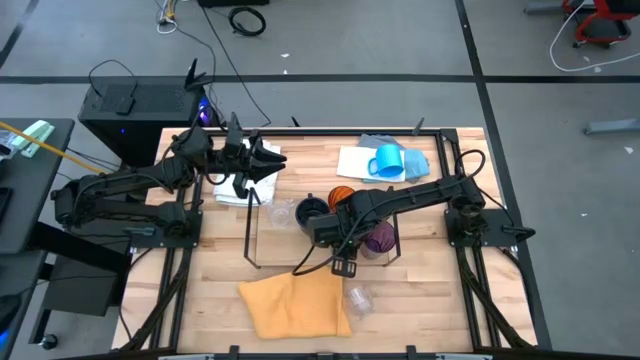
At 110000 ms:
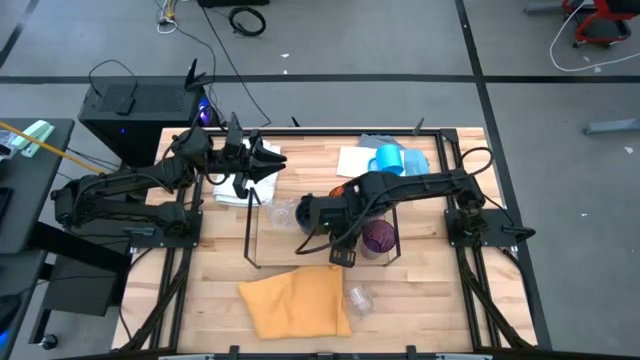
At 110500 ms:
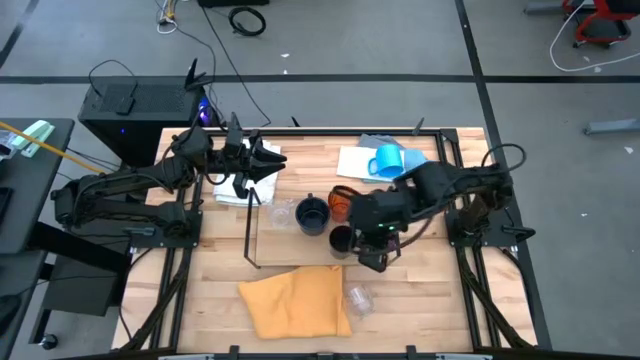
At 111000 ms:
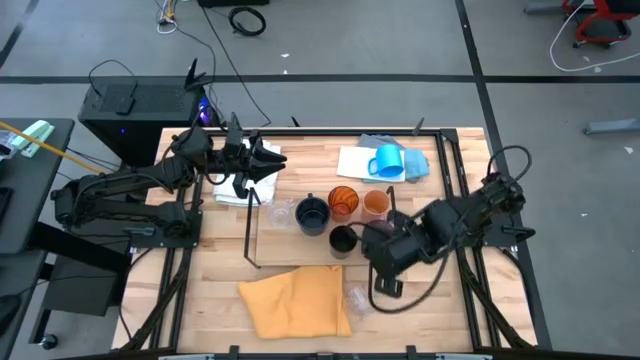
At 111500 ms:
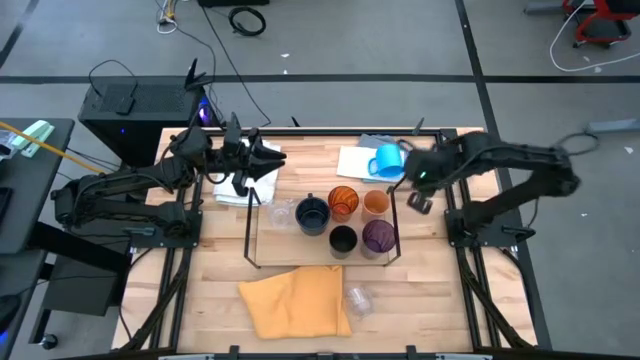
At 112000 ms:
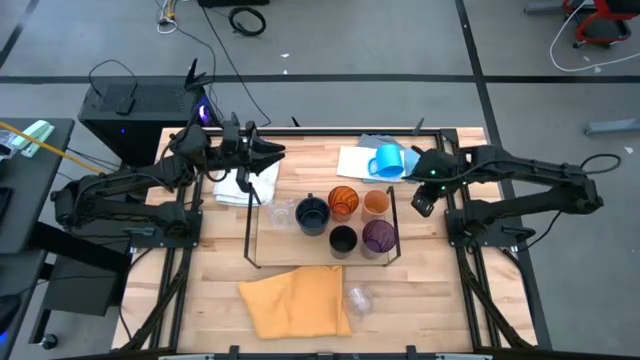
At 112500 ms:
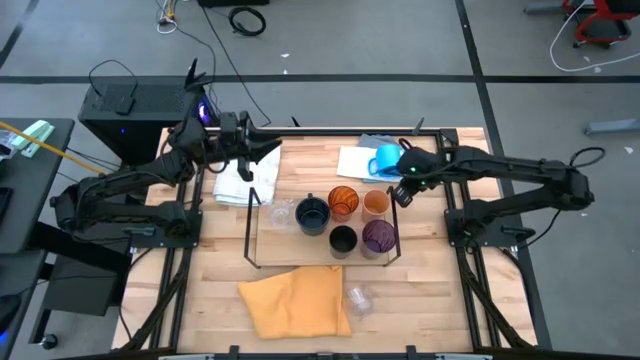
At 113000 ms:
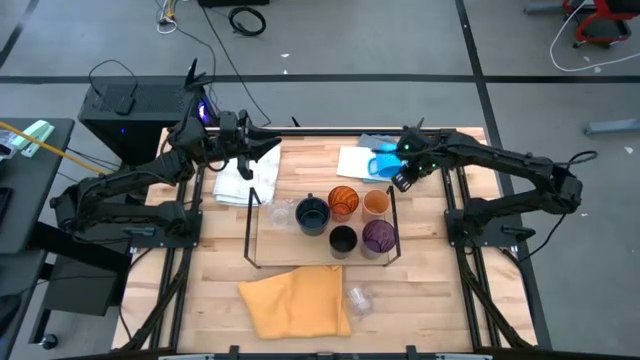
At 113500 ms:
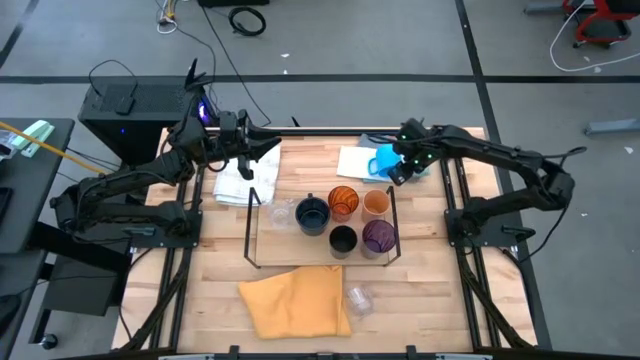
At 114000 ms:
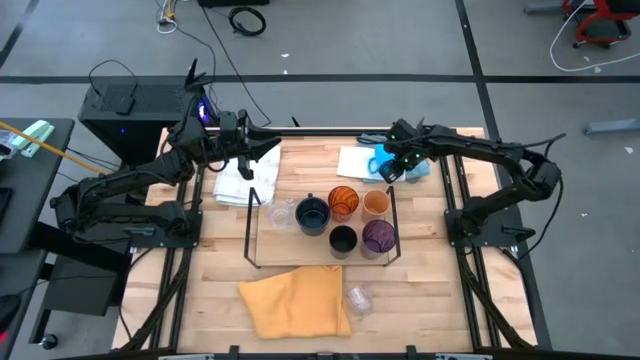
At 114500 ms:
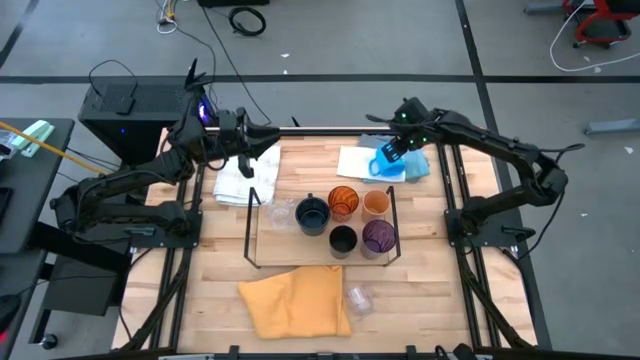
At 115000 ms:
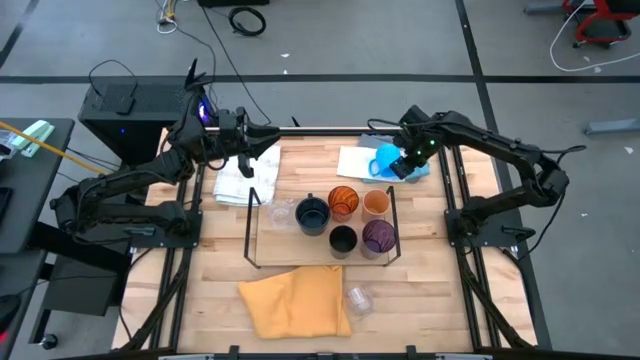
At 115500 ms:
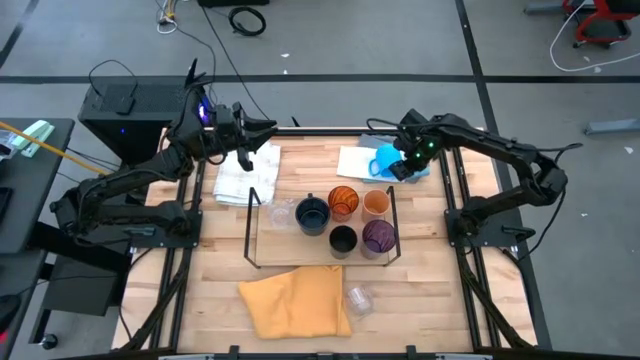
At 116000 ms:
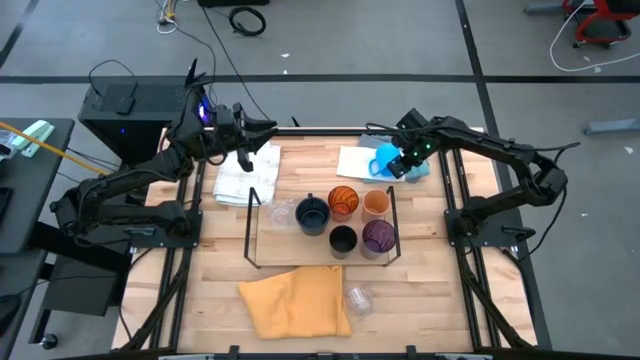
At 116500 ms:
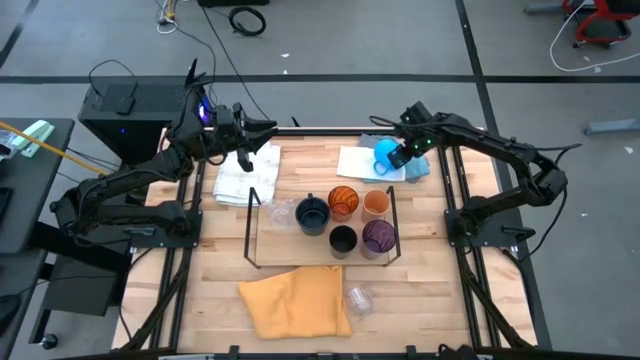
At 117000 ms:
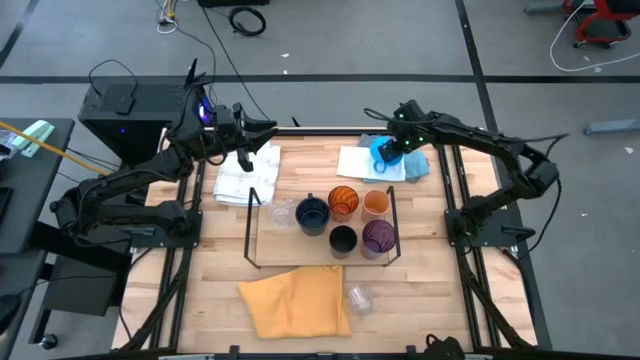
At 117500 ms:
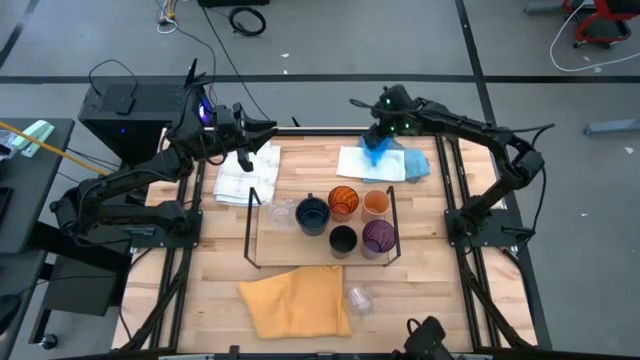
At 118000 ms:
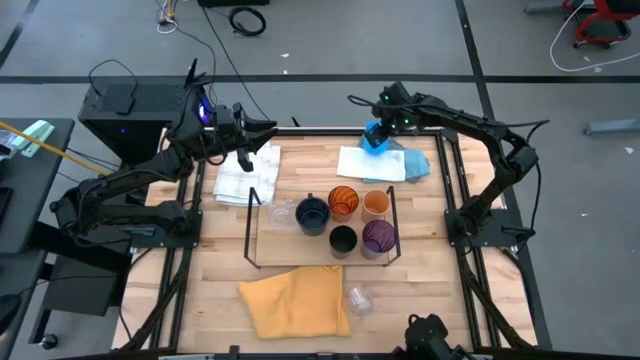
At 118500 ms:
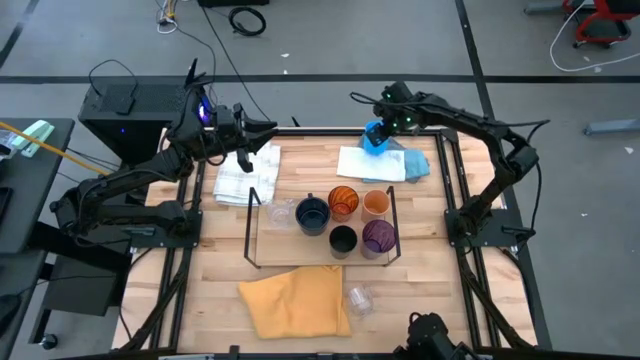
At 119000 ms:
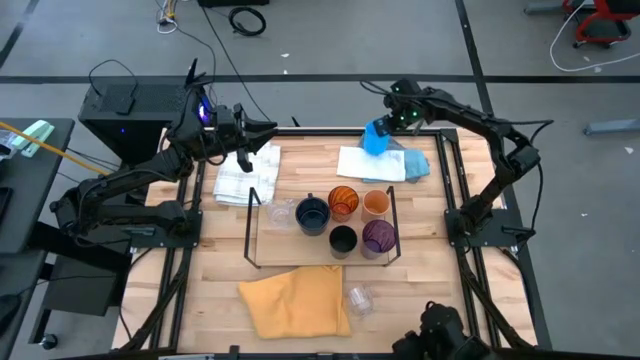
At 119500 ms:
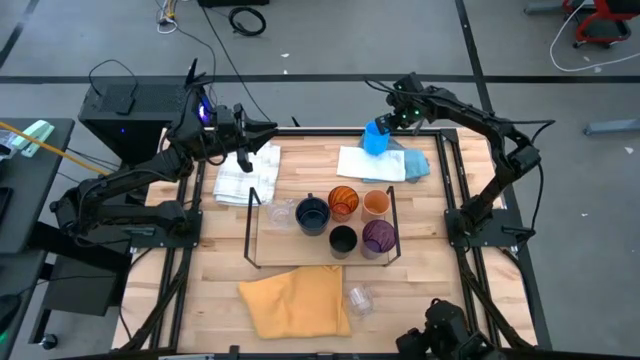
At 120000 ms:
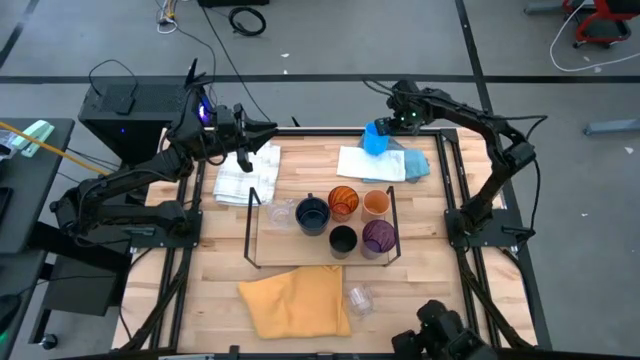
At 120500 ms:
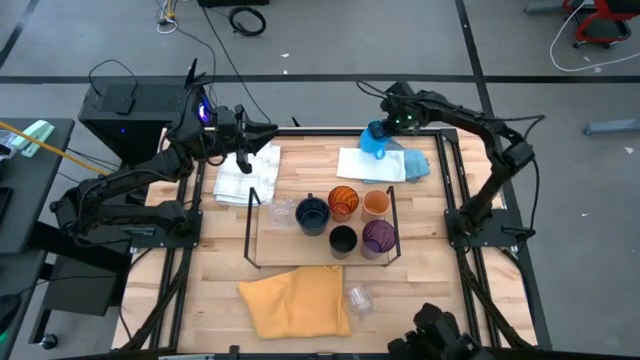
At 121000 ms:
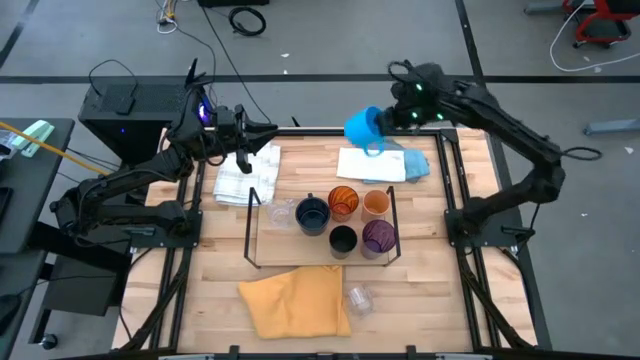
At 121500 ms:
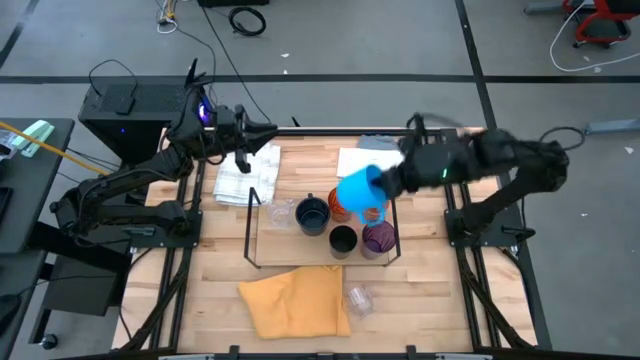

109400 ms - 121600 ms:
Task: Stack small to large cups/mugs on shelf
Put the blue cup on the shelf aligned with the dark blue cup

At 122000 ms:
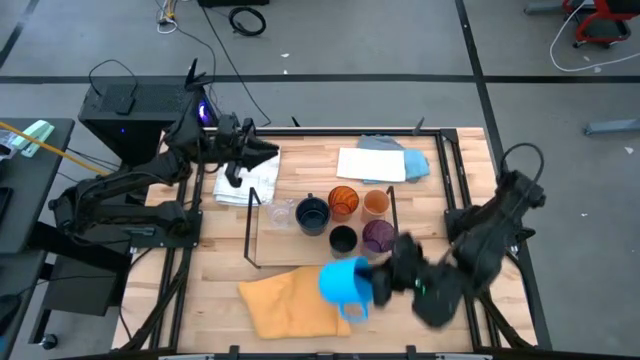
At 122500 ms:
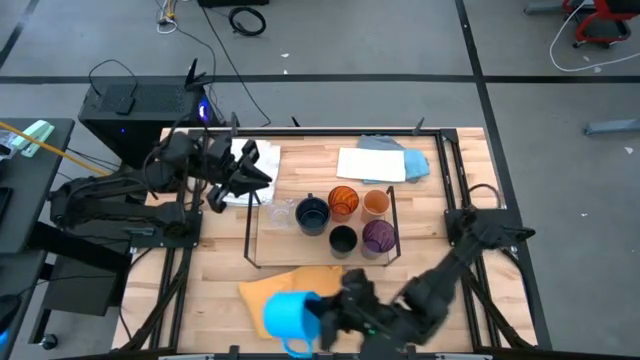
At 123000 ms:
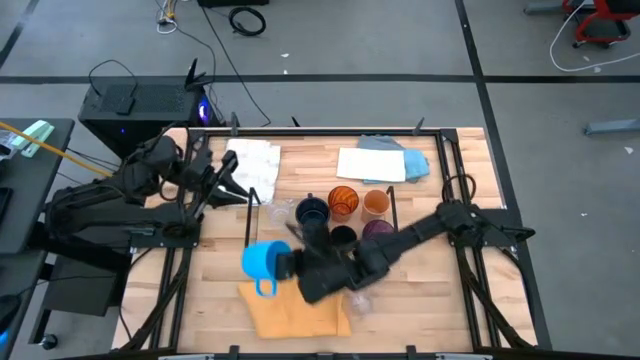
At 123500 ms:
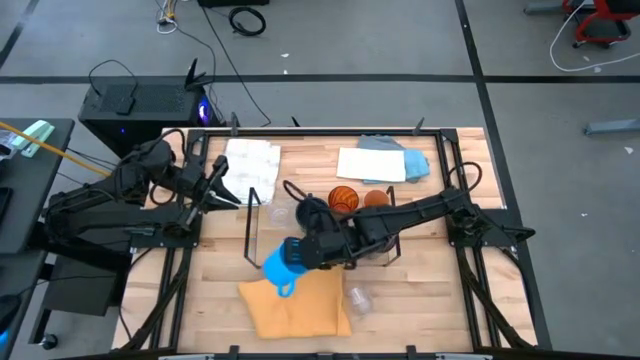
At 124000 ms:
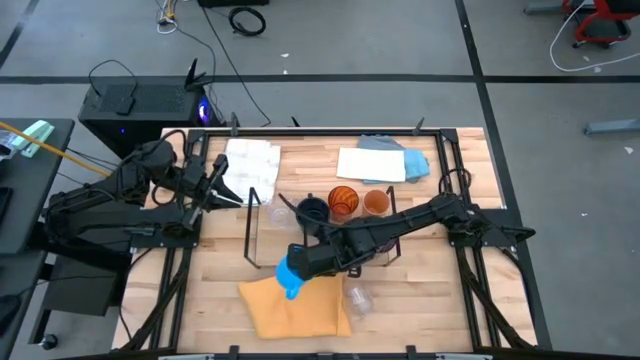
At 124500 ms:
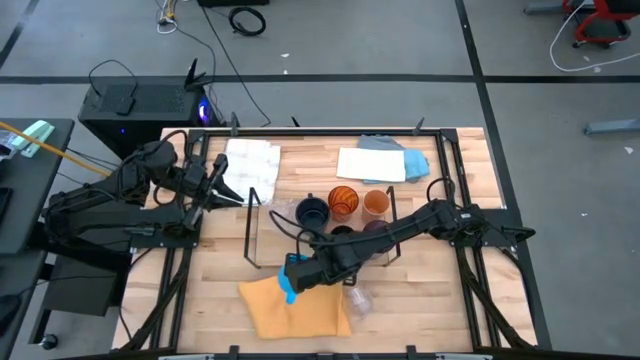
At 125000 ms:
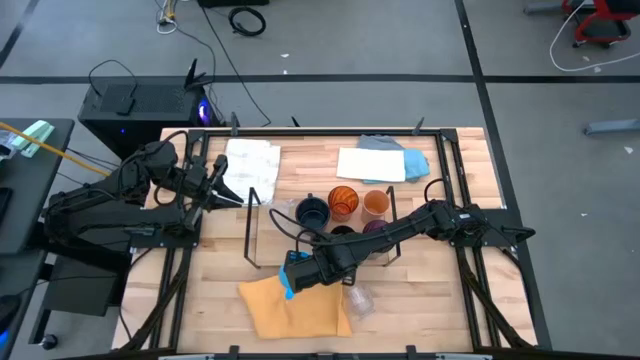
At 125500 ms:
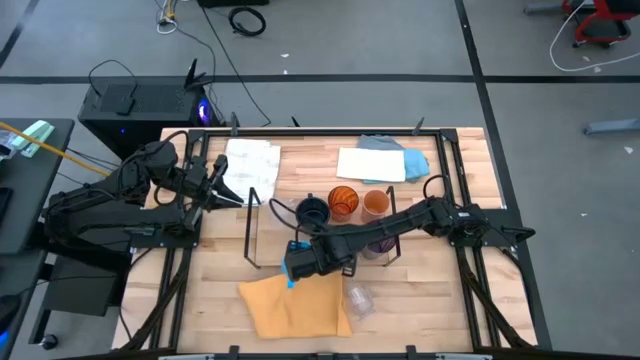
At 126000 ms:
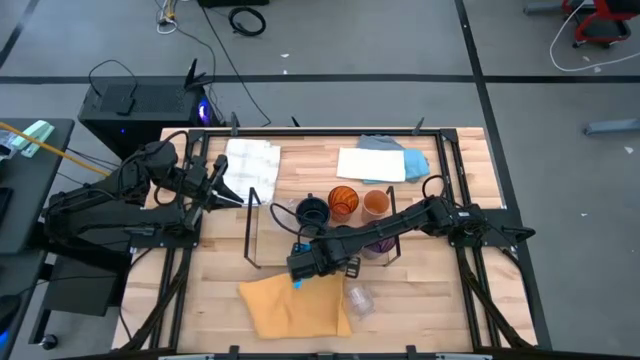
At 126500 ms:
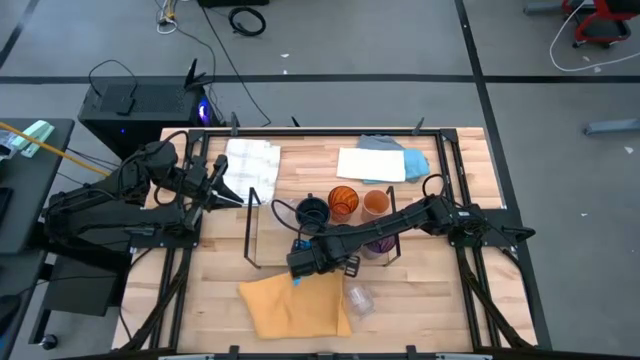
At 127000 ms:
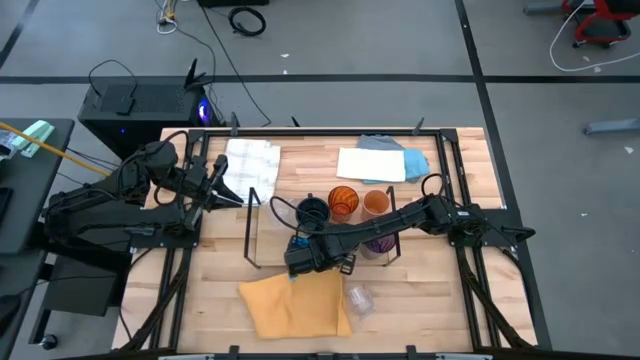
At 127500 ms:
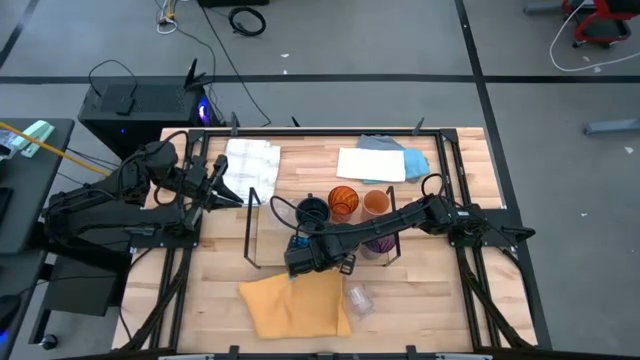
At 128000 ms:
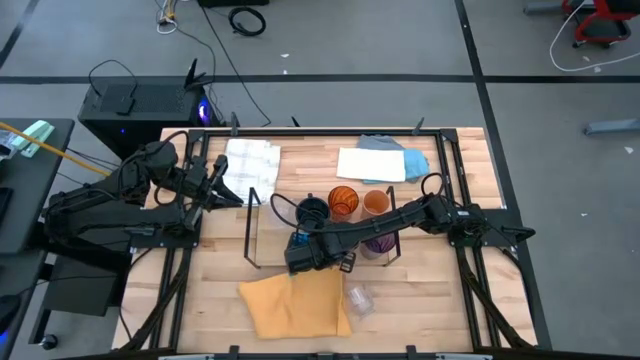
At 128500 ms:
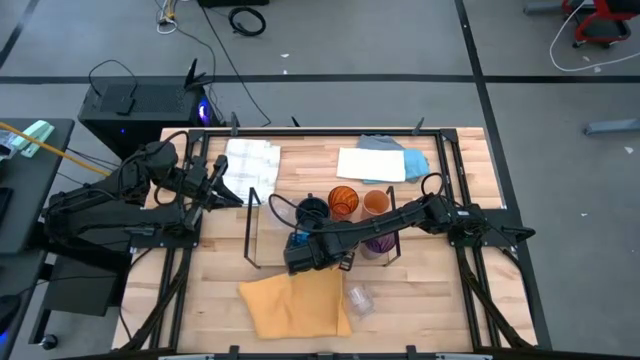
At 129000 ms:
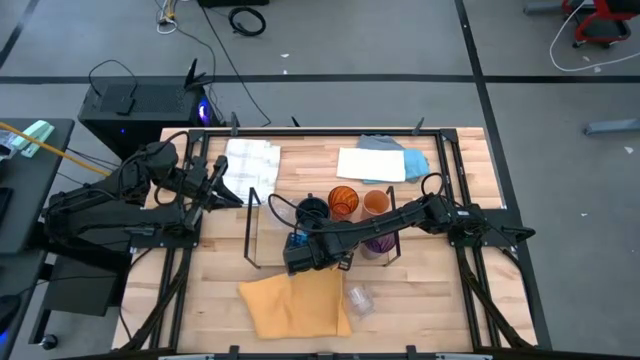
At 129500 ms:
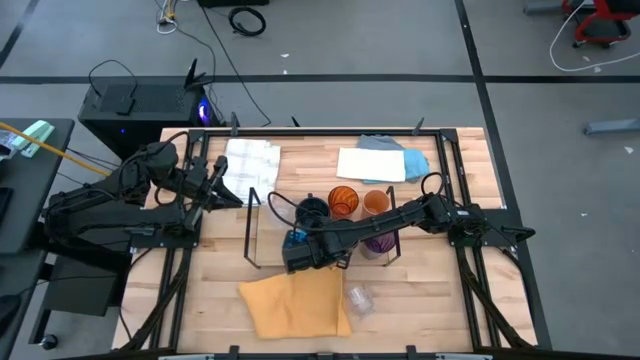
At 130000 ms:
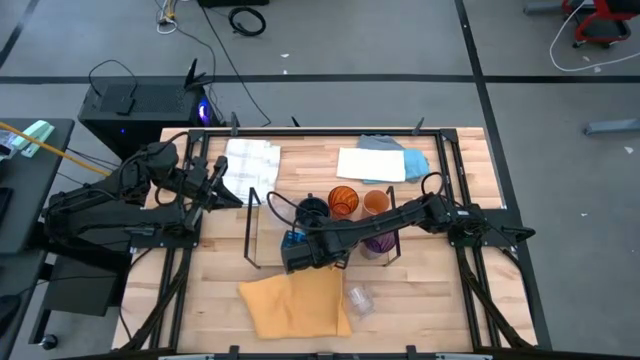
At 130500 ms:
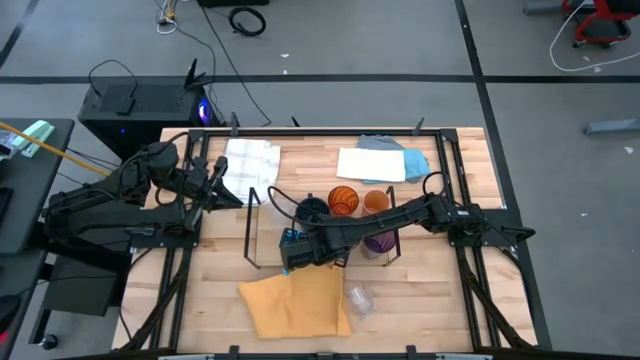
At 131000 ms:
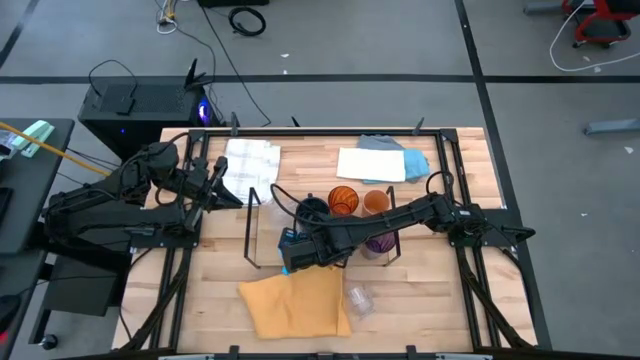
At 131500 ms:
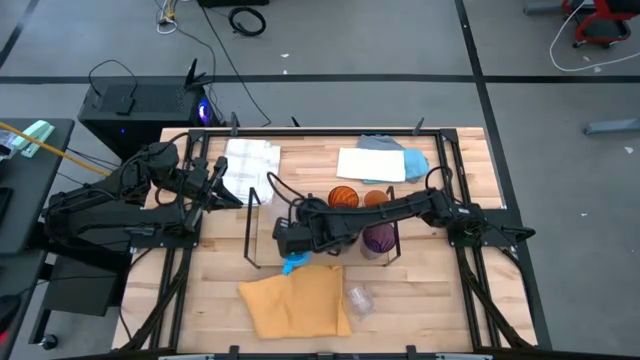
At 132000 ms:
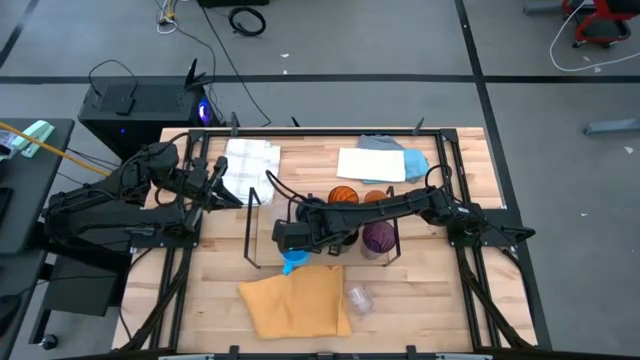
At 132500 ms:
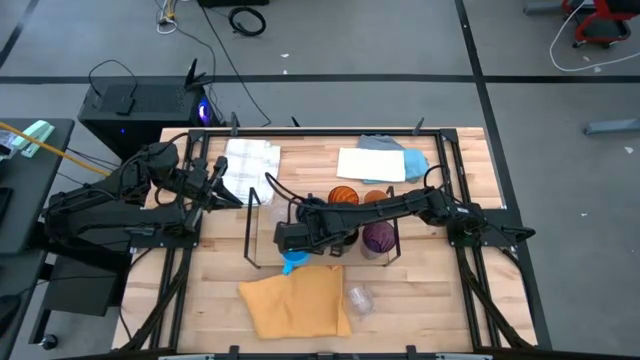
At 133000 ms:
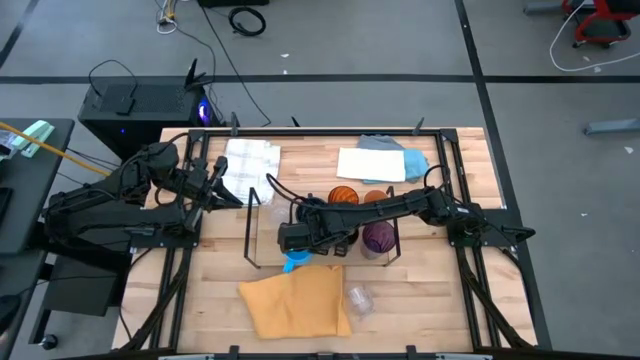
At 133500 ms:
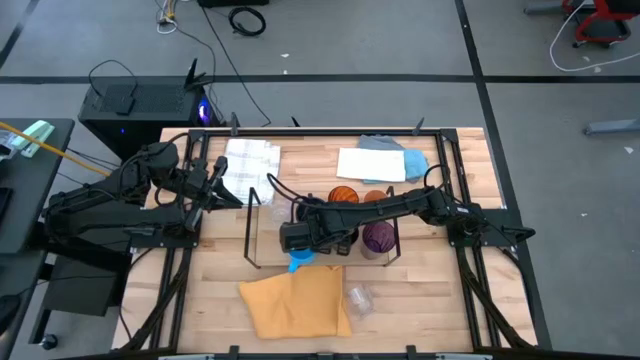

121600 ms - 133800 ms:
Put the blue cup on the shelf aligned with the dark blue cup
